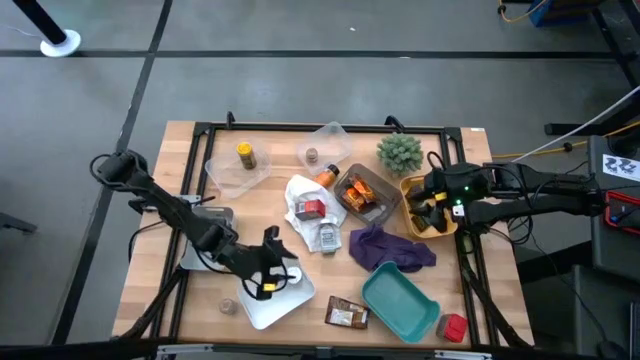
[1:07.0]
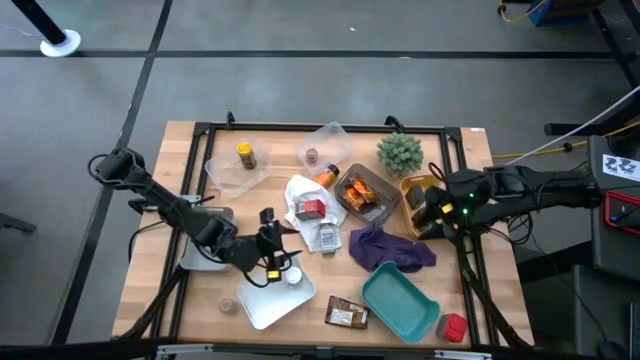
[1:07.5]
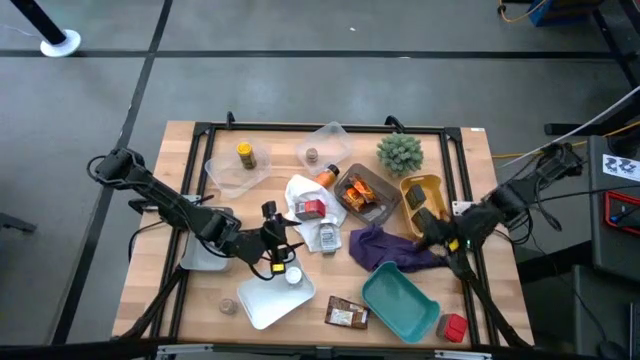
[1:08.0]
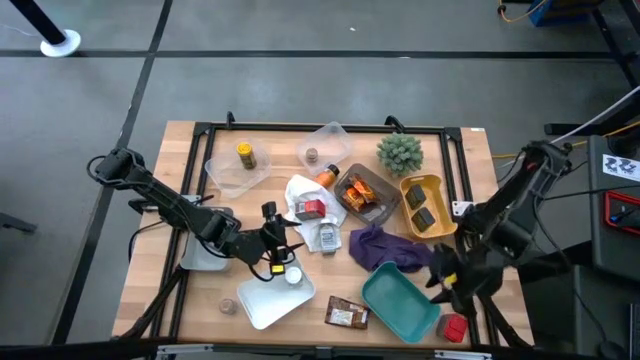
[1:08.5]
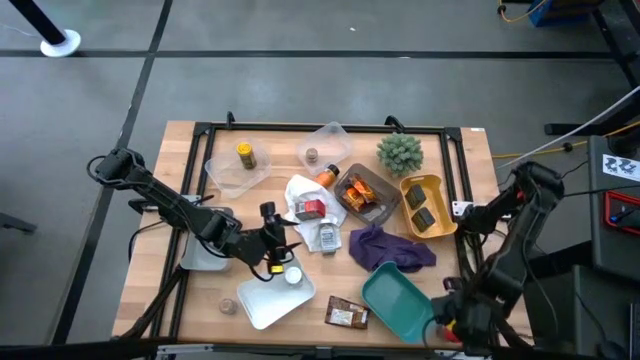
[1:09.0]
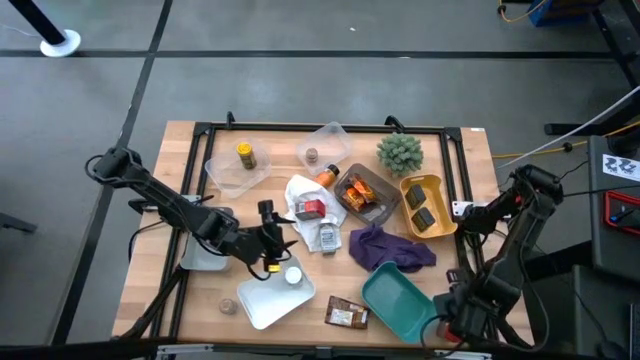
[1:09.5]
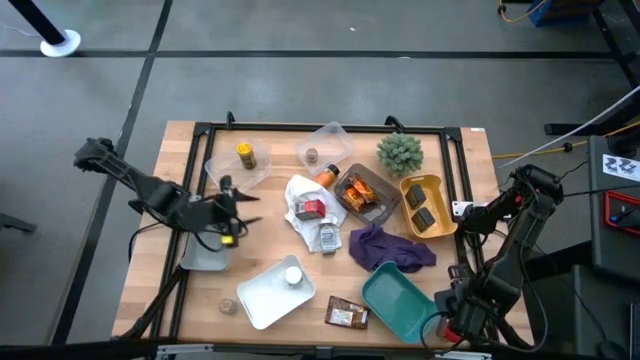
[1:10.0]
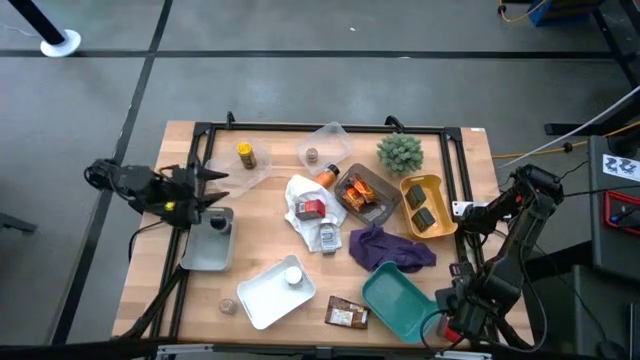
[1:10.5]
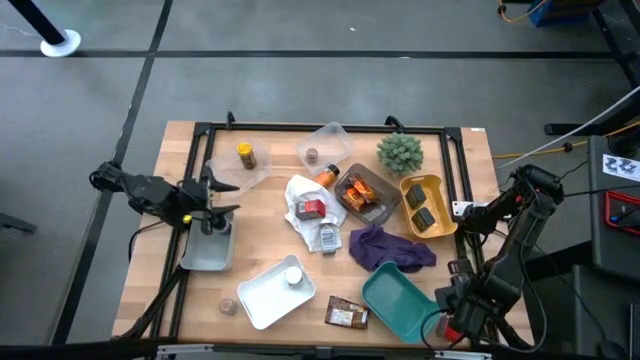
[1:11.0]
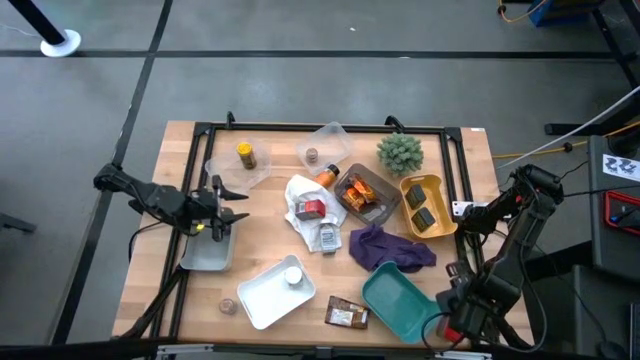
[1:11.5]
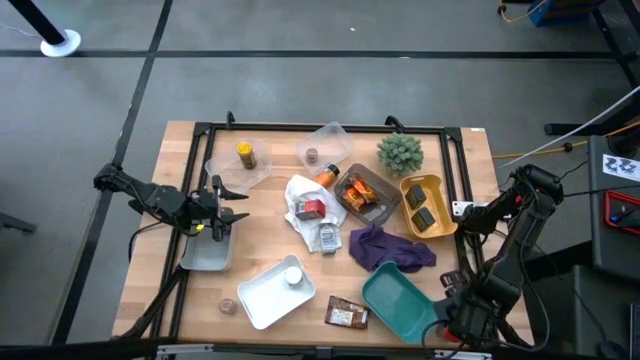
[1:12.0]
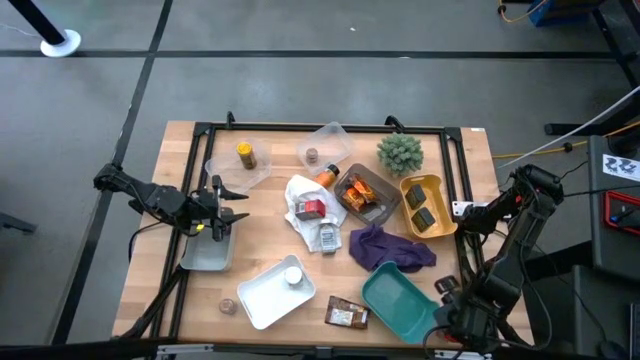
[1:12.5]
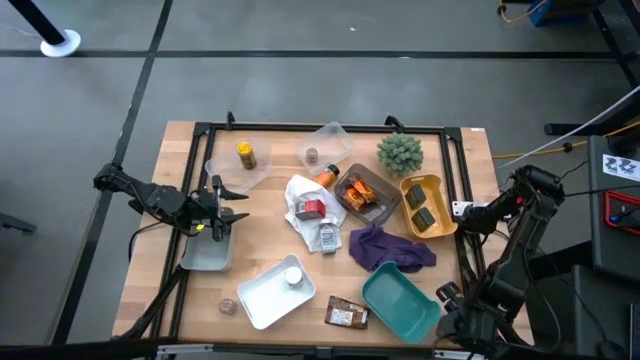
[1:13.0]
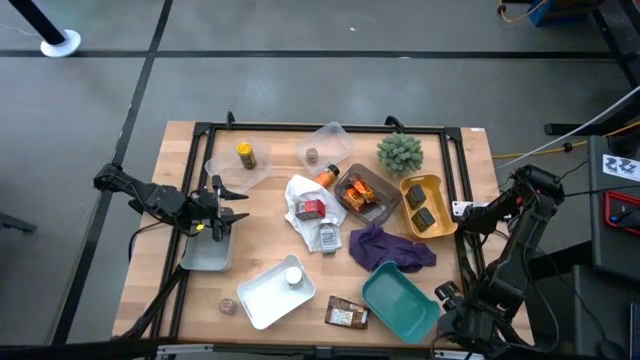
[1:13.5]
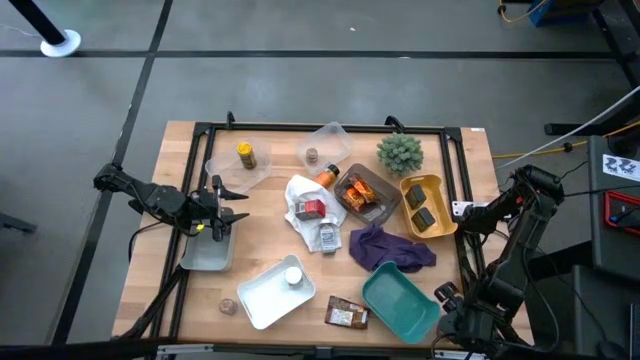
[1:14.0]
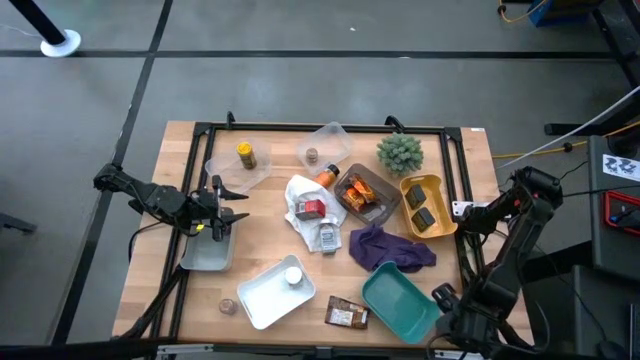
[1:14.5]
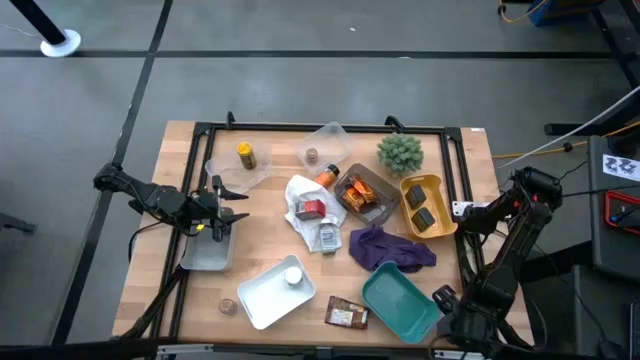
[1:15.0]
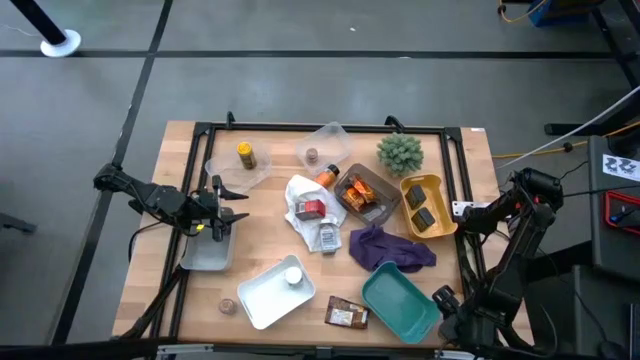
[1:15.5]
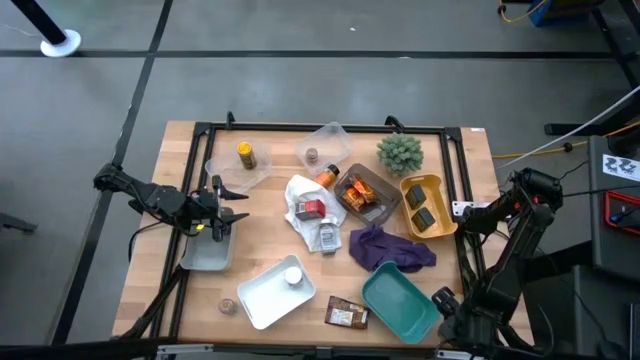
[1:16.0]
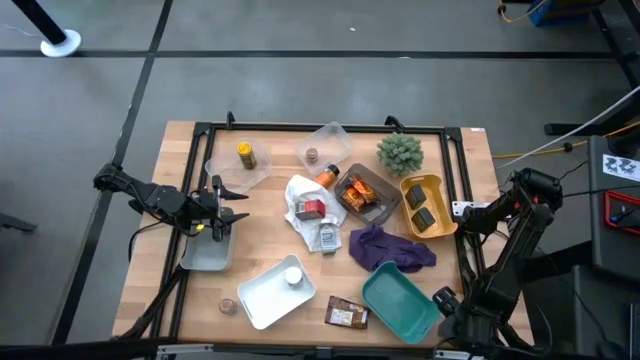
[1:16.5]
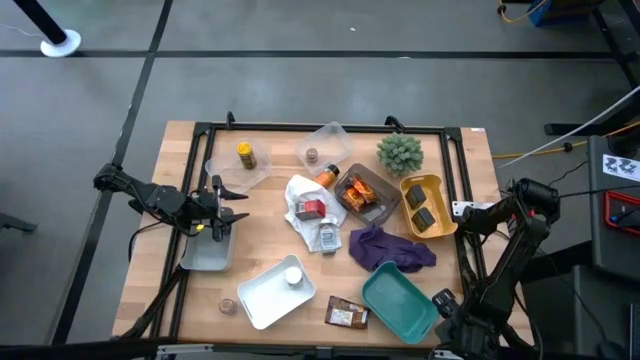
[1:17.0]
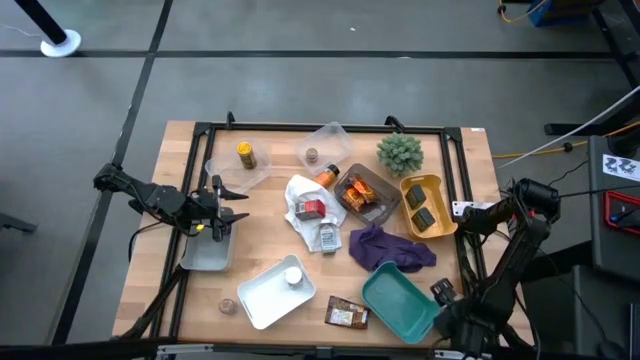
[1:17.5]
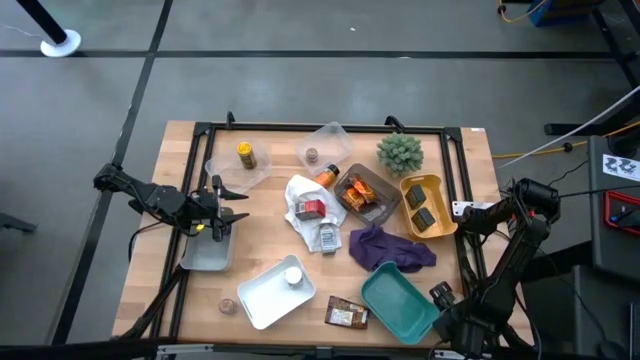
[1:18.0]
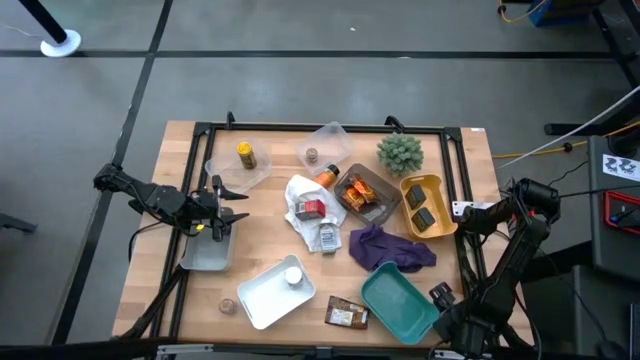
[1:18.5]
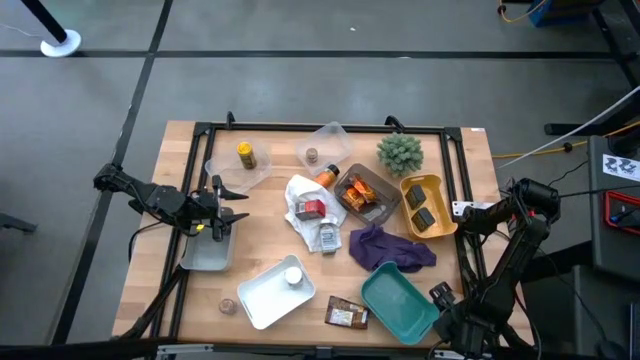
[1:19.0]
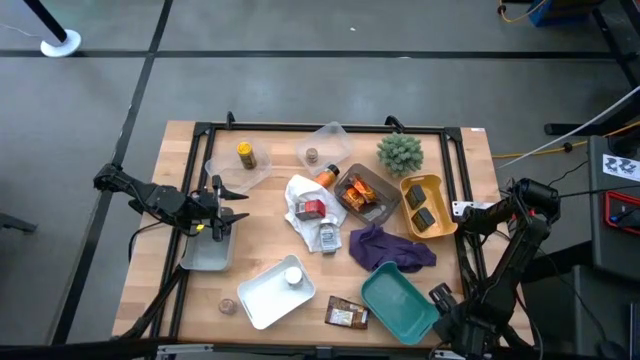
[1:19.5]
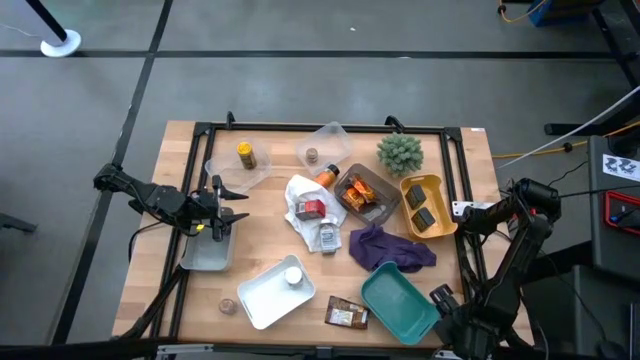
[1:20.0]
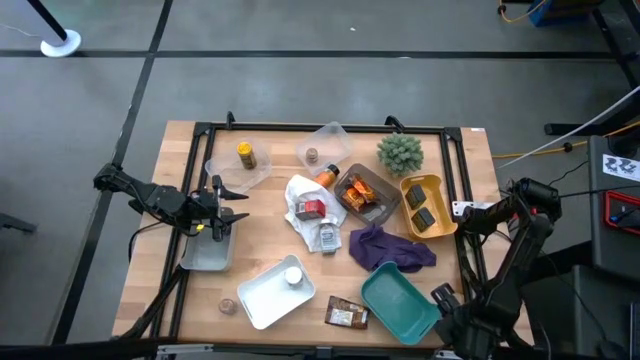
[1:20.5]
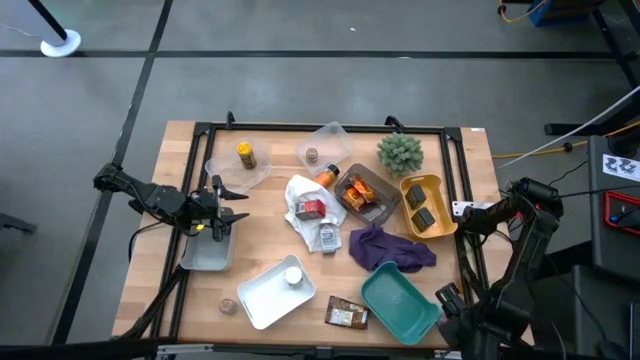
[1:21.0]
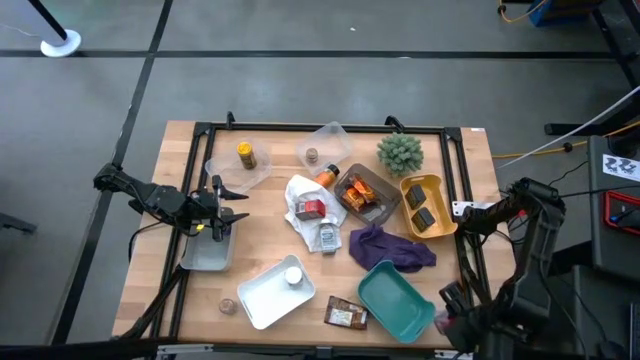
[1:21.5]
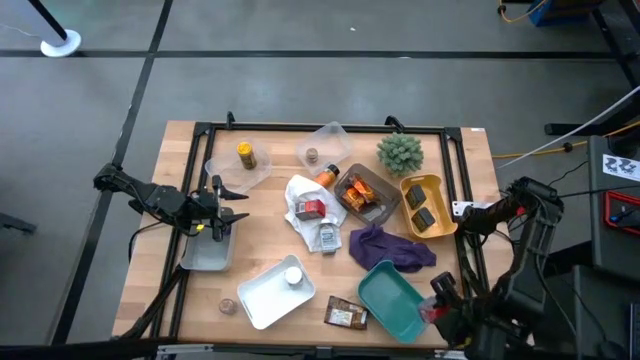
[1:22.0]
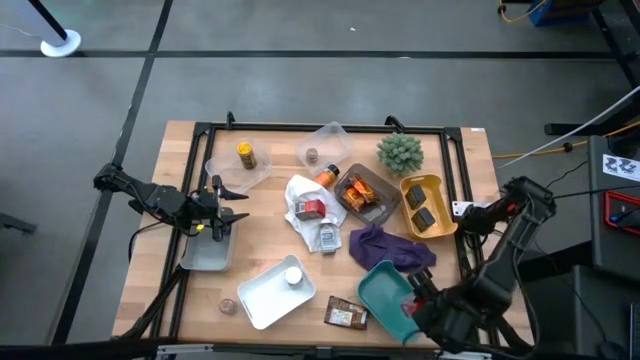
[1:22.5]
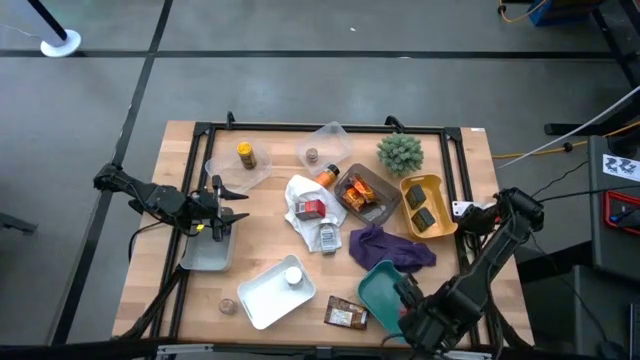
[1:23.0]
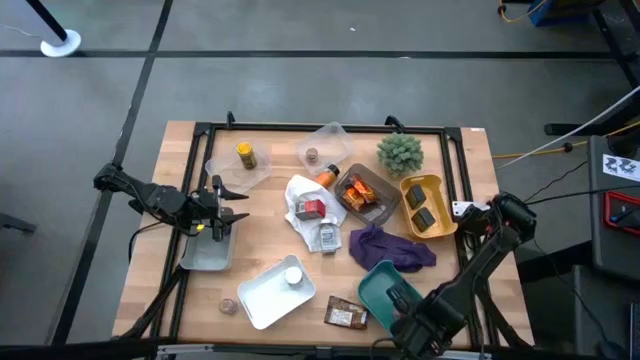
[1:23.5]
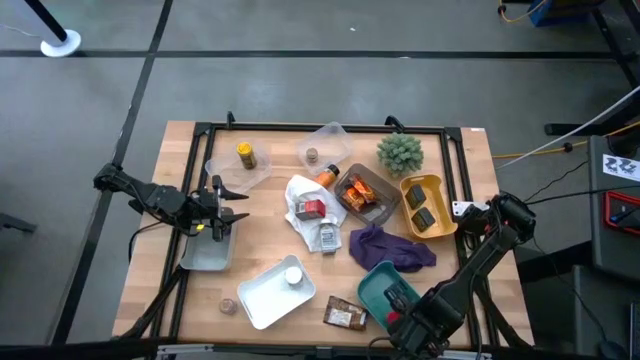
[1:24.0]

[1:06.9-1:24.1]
Task: Sort spices by type
Put the bottom red spice can into the green bin
